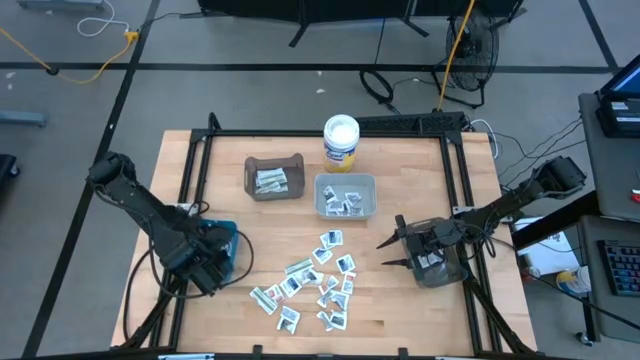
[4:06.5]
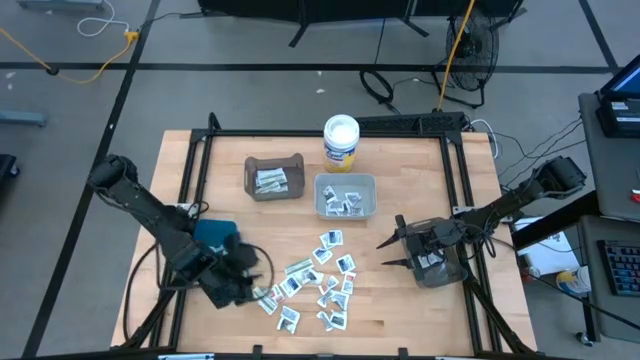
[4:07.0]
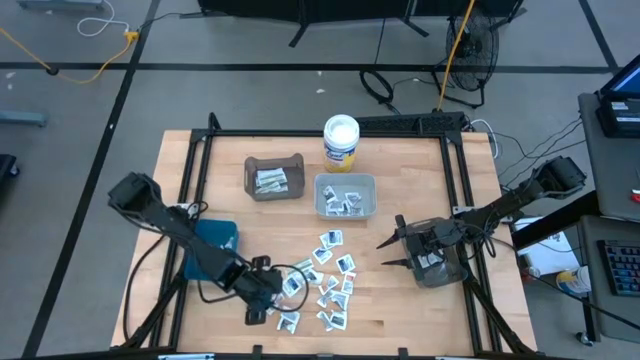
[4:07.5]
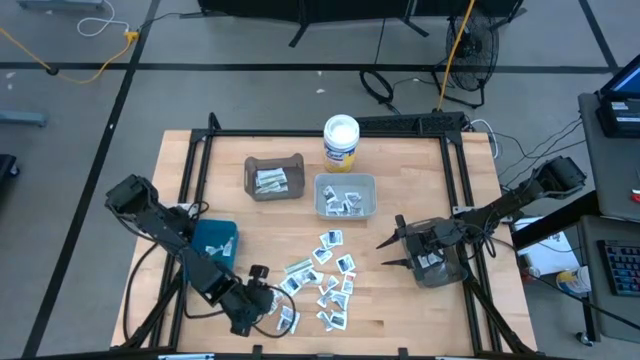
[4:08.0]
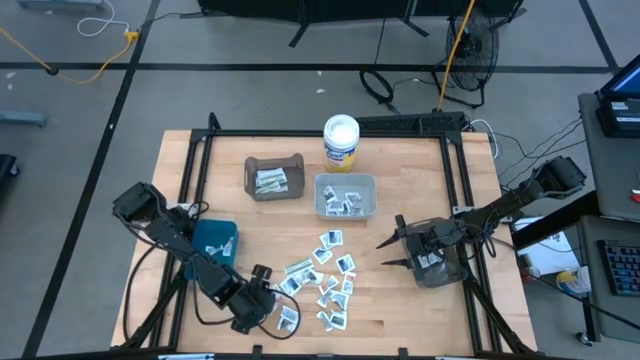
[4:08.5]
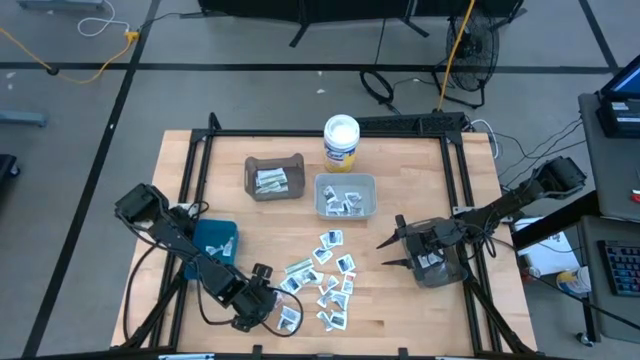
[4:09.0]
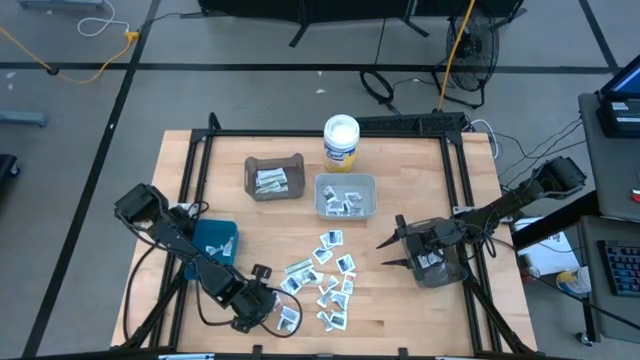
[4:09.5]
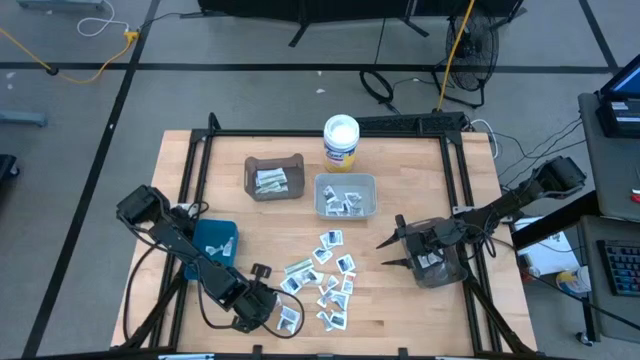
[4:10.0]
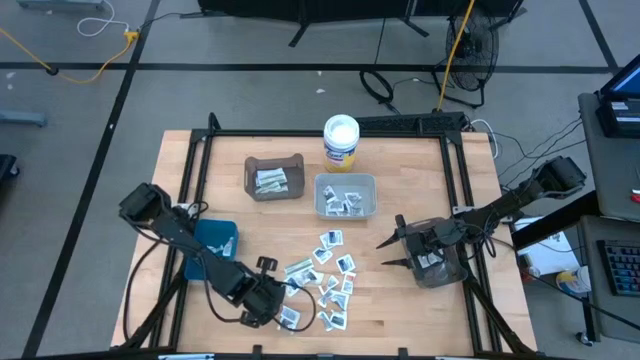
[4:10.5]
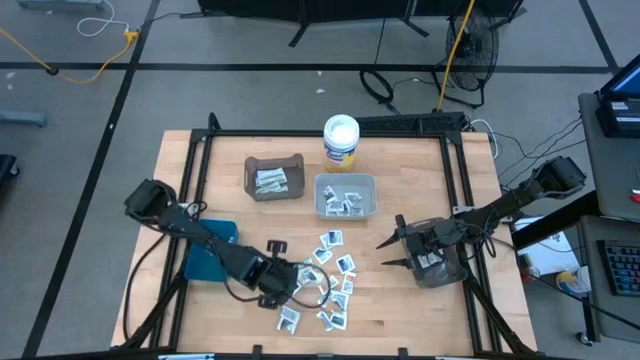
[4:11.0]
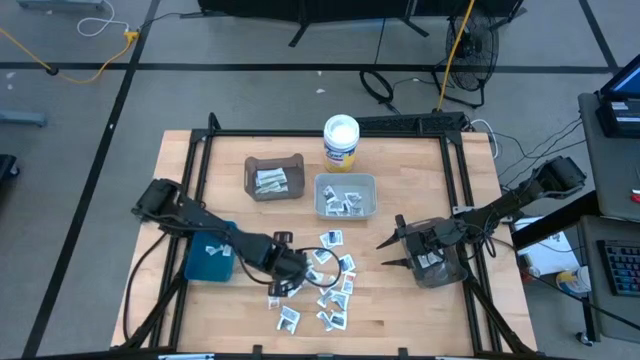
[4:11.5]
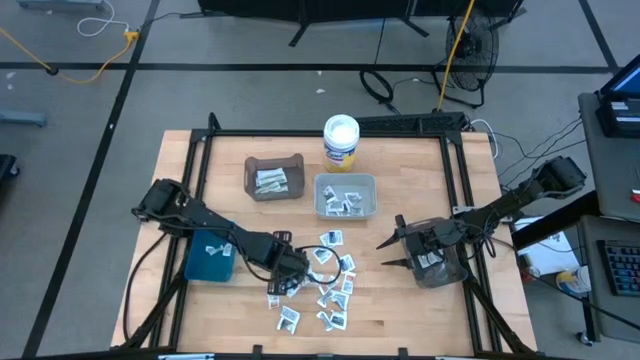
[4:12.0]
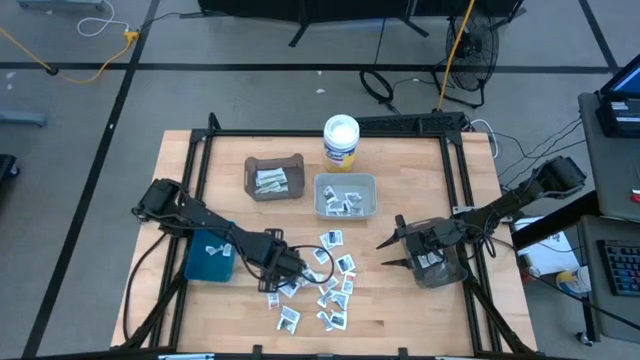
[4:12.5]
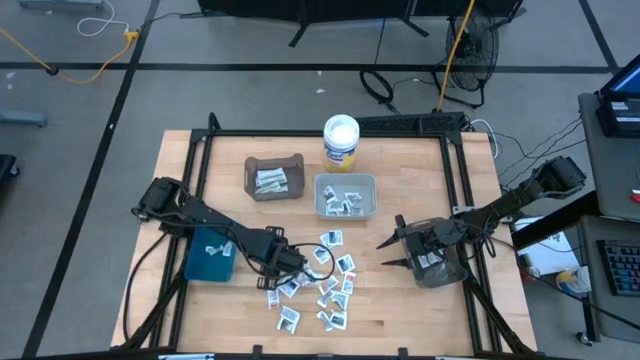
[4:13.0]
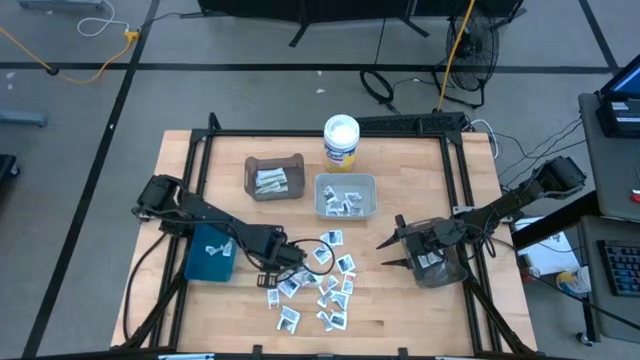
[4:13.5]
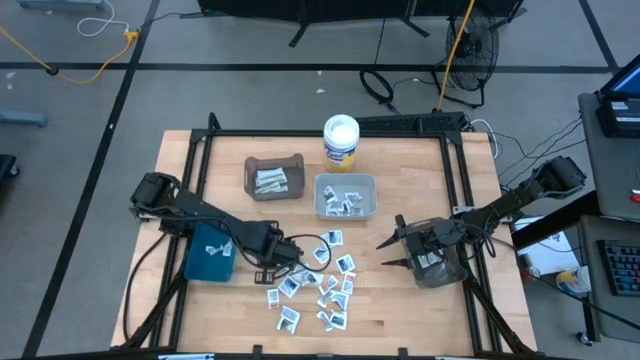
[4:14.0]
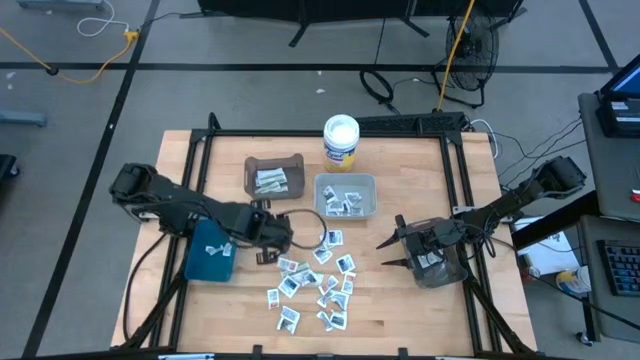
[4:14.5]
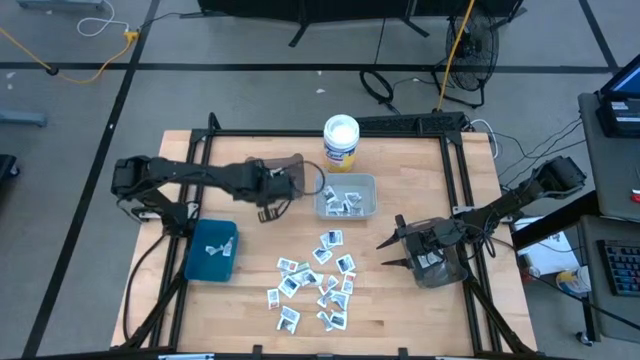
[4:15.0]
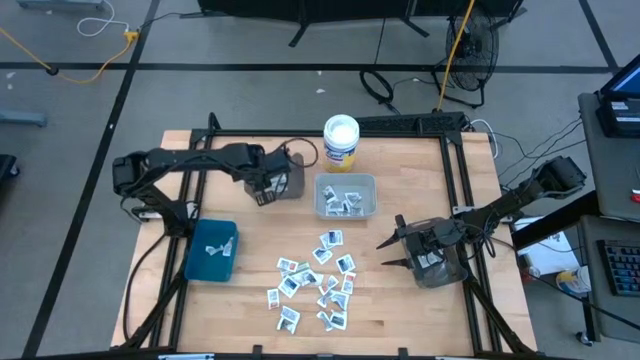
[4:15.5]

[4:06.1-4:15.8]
Task: Pick & Place First Aid Supplies
Put the green bandage pack into the top black bin

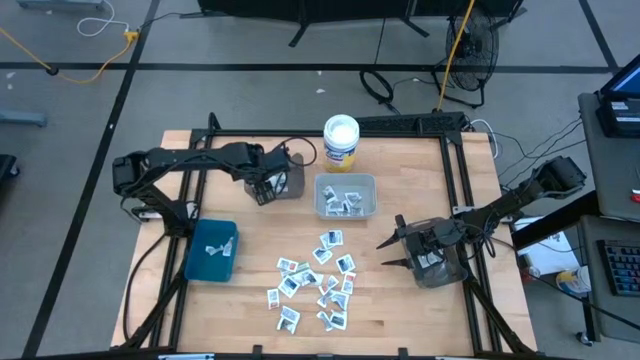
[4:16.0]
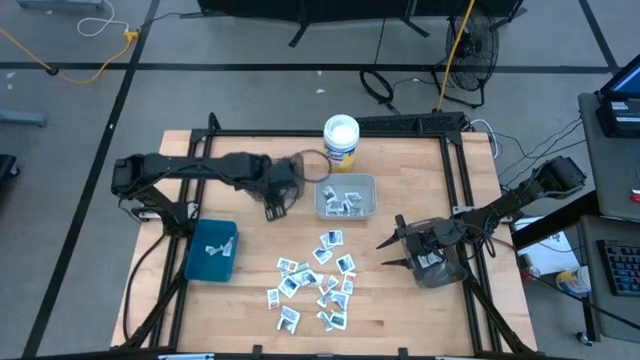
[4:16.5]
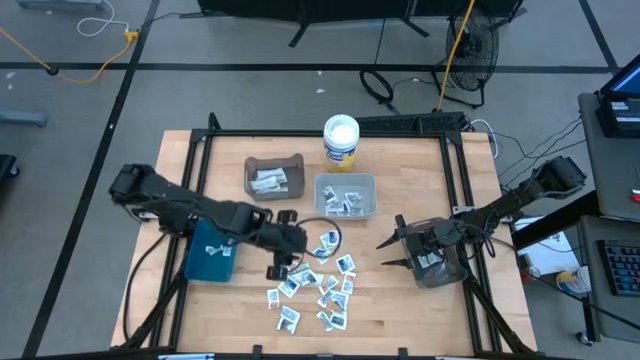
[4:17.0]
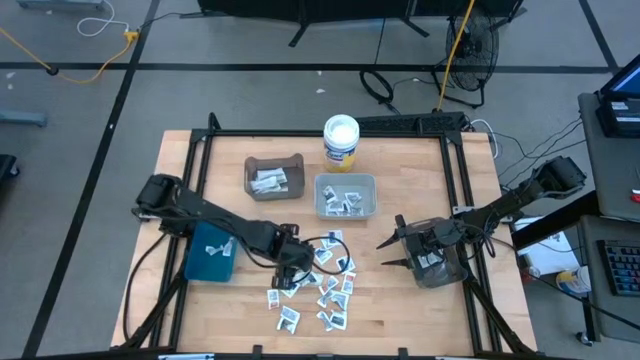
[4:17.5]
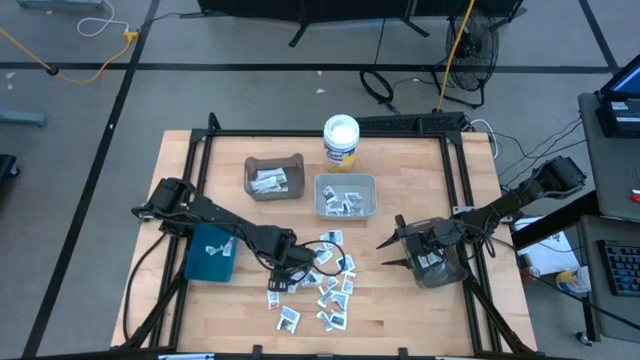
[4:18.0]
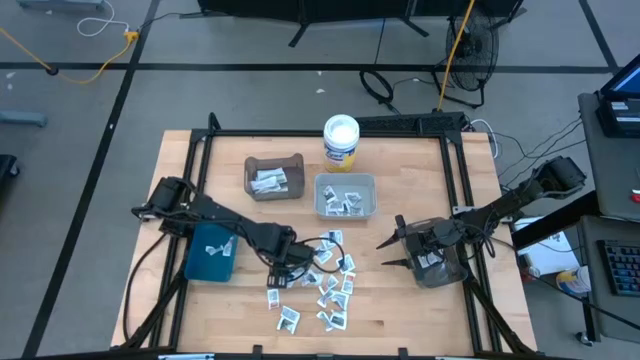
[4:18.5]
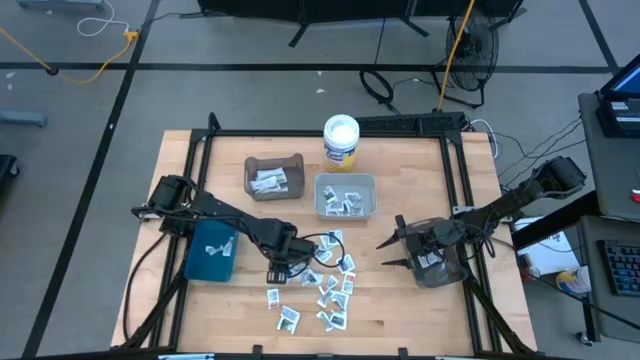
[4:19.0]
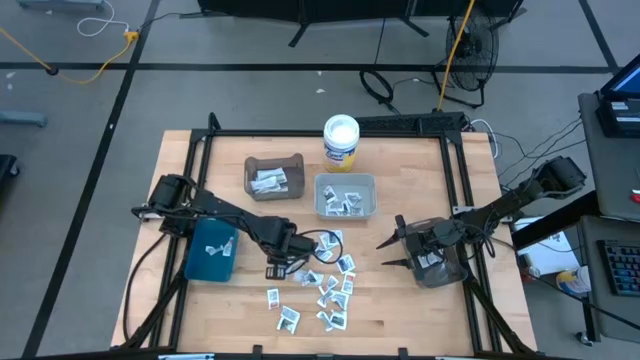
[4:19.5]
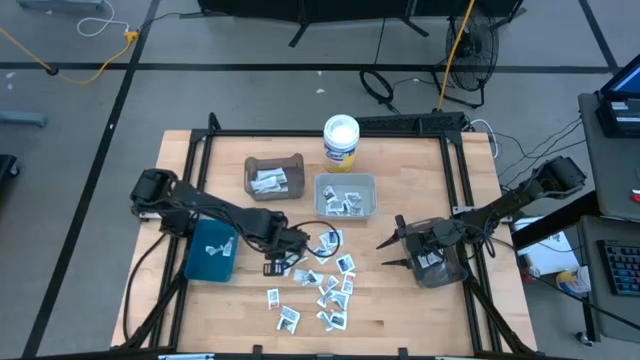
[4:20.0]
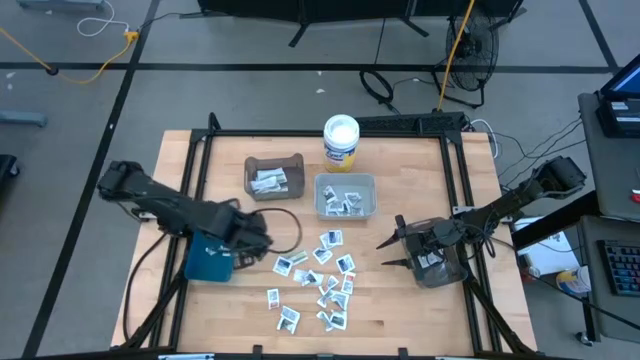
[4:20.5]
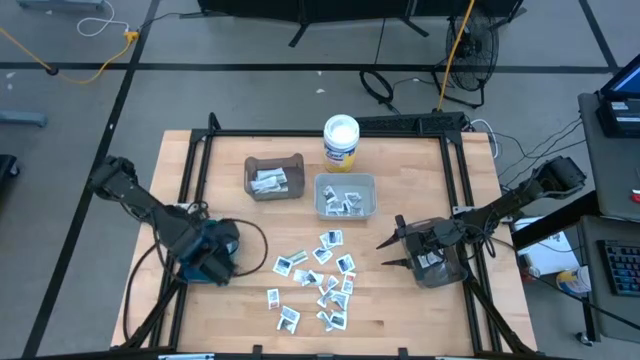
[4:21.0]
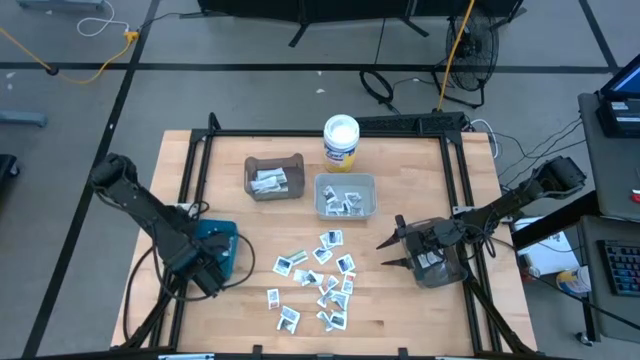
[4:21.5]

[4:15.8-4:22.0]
Put the orange ointment pack into the blue bin

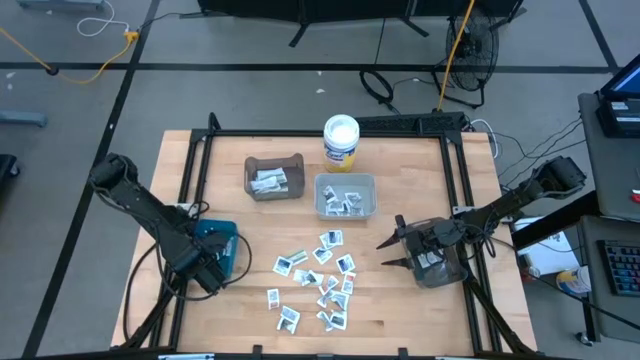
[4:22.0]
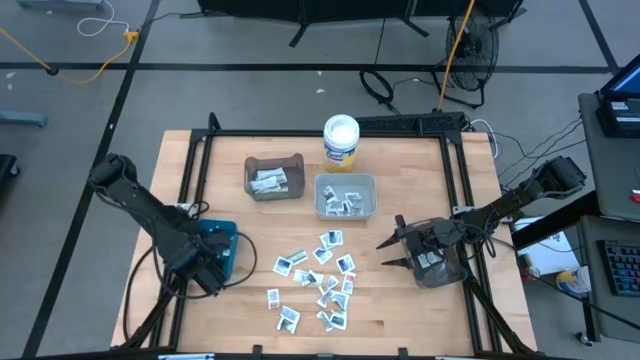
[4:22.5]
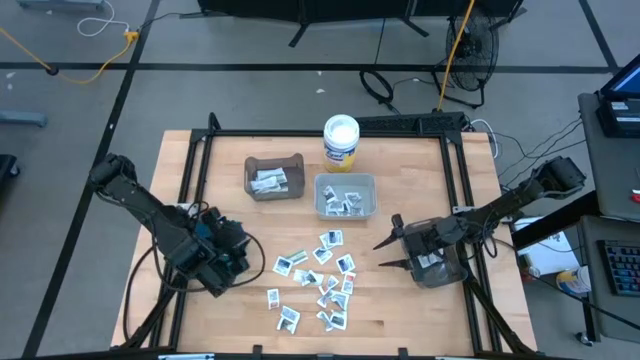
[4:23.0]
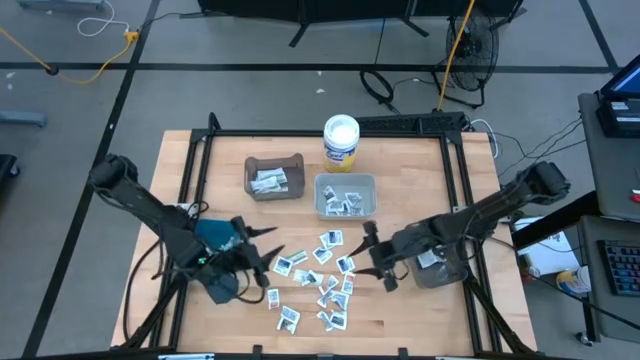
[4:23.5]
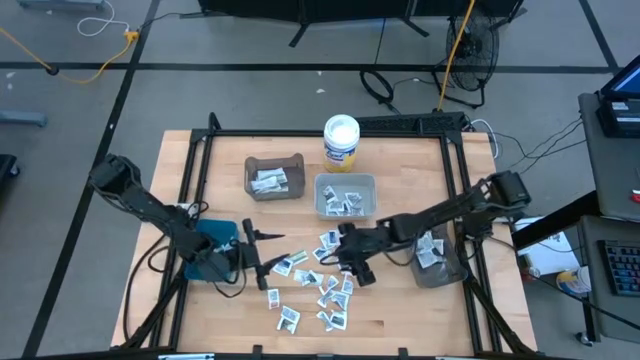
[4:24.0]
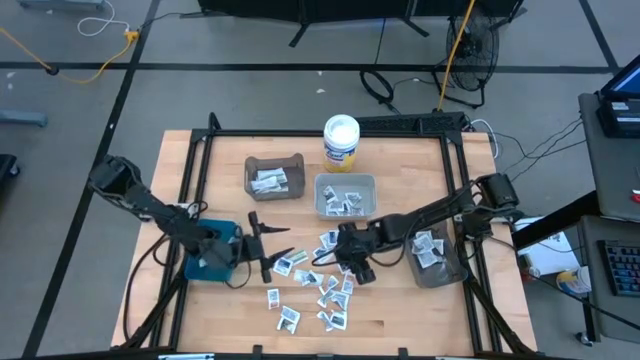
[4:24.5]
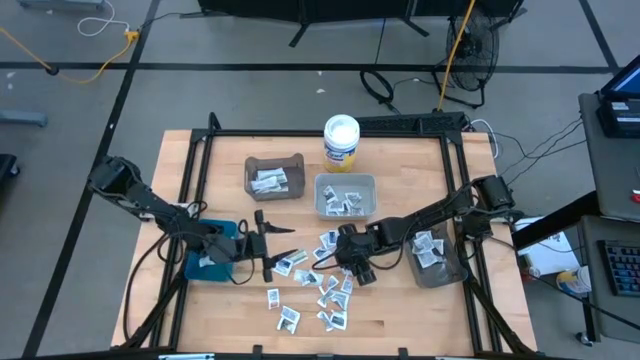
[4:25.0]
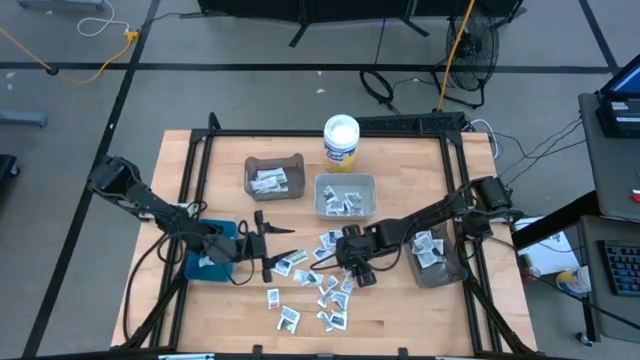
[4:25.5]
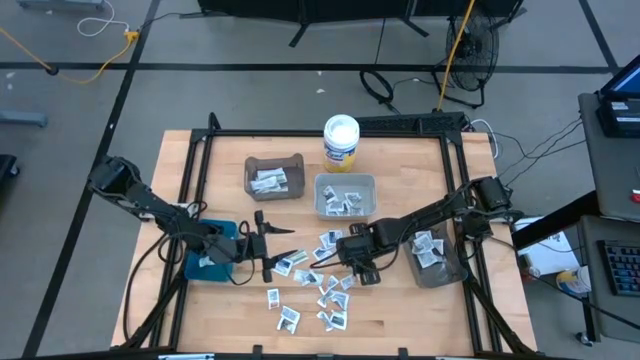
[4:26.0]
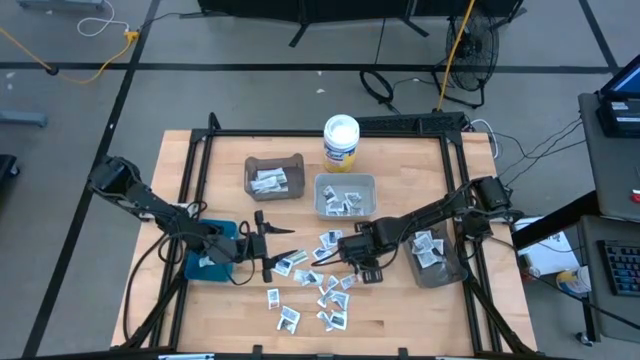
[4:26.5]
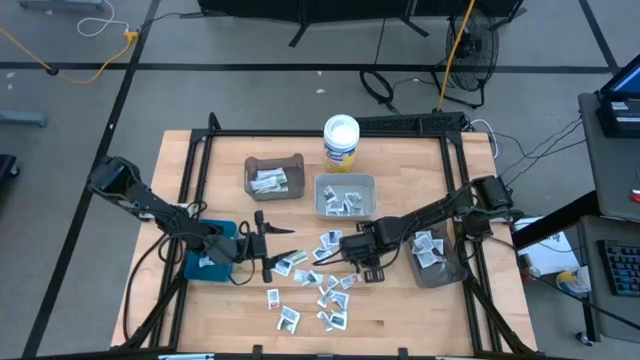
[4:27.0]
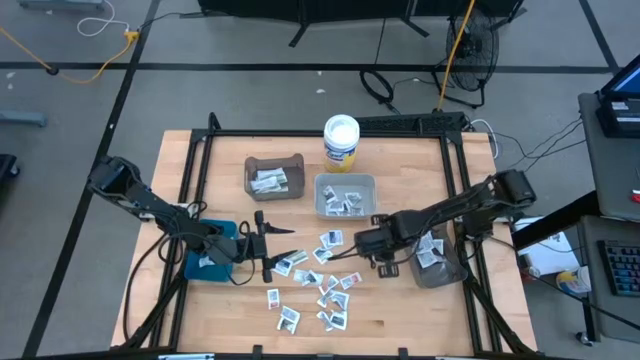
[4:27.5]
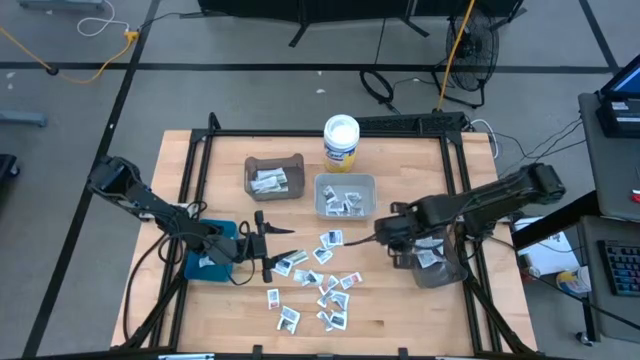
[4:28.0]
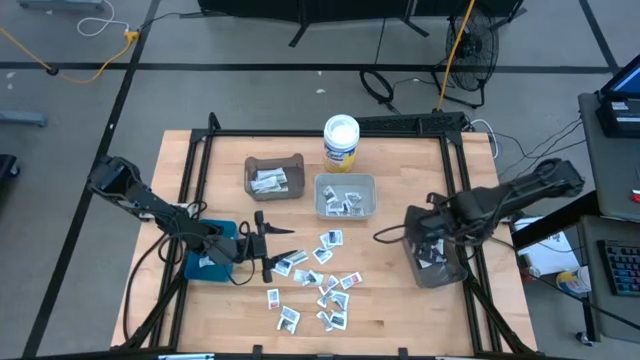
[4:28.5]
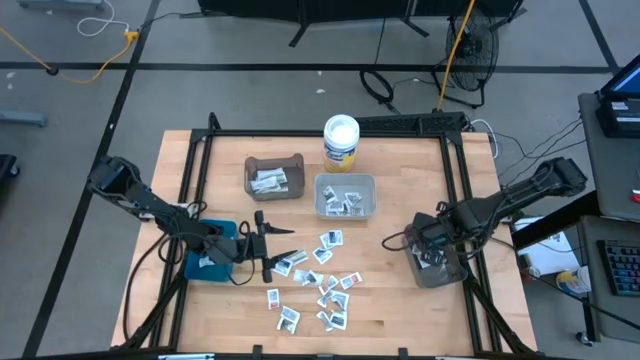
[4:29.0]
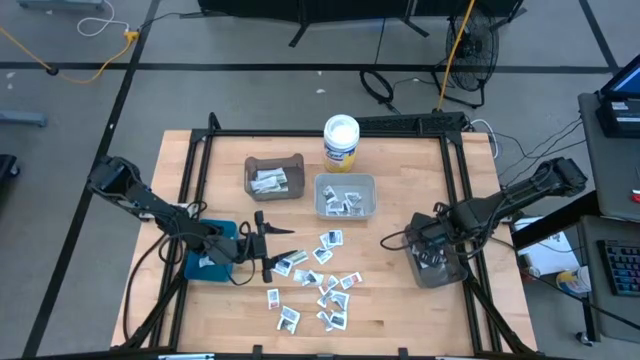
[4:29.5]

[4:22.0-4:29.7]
Put the blue alcohol pad into the bottom black bin
